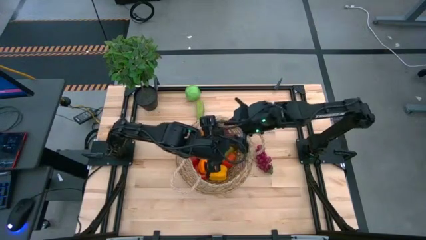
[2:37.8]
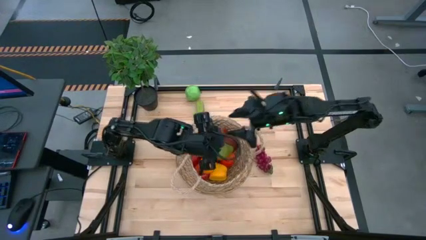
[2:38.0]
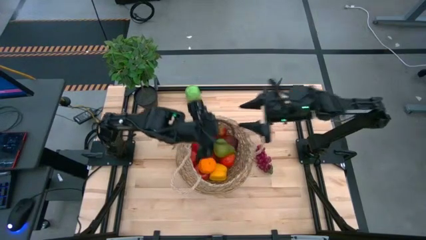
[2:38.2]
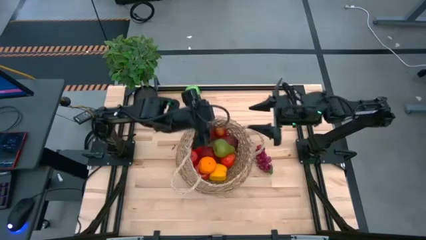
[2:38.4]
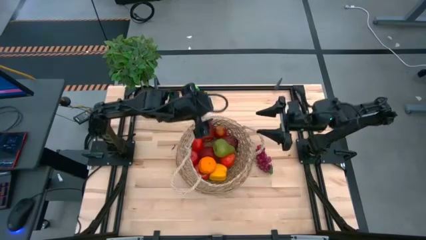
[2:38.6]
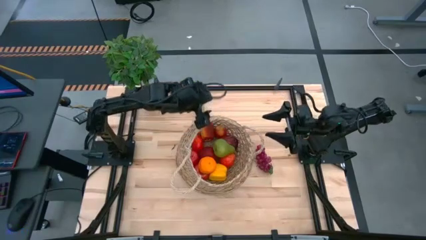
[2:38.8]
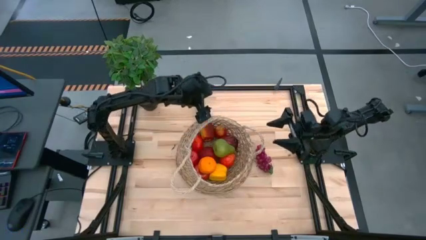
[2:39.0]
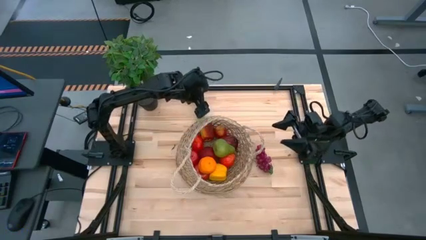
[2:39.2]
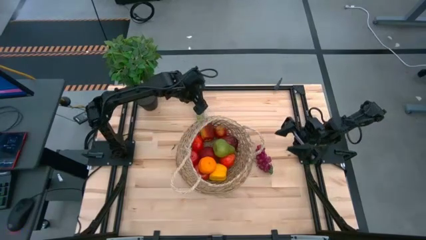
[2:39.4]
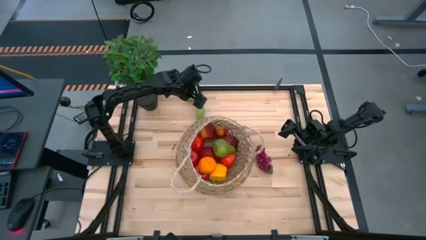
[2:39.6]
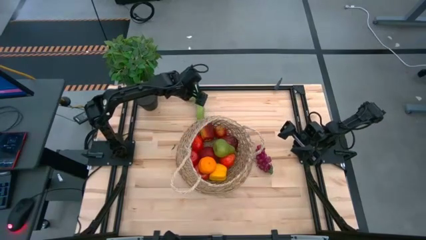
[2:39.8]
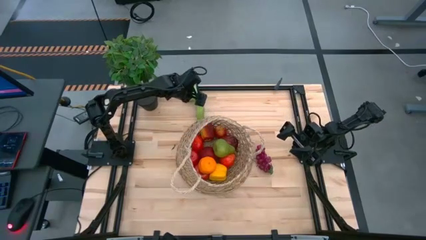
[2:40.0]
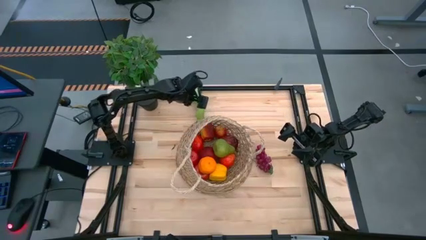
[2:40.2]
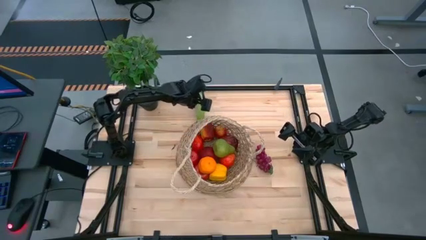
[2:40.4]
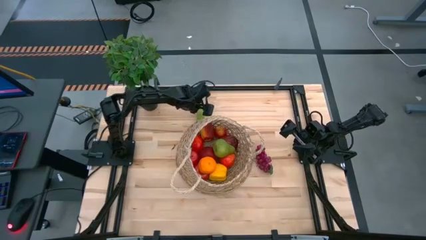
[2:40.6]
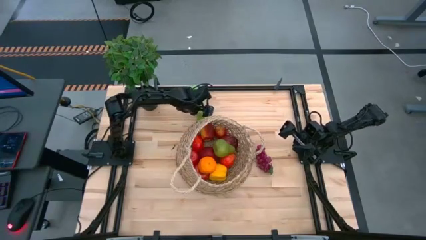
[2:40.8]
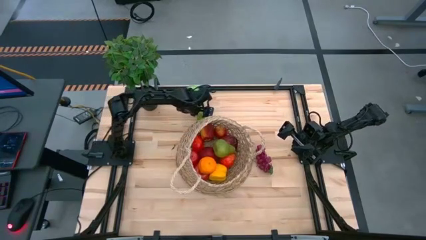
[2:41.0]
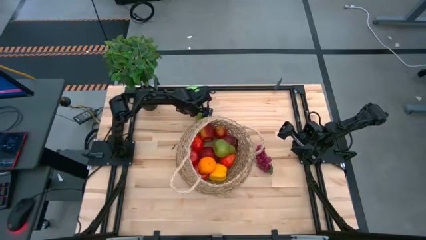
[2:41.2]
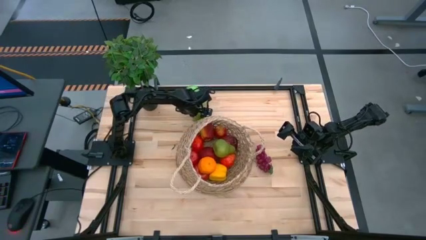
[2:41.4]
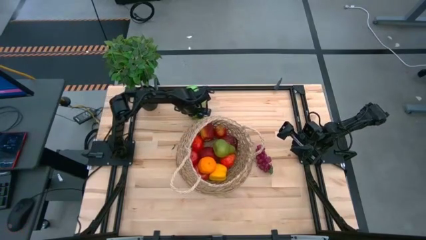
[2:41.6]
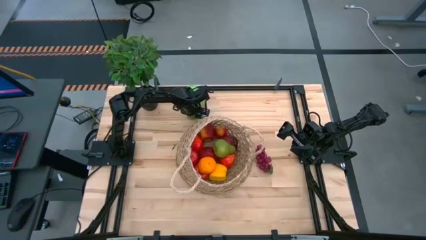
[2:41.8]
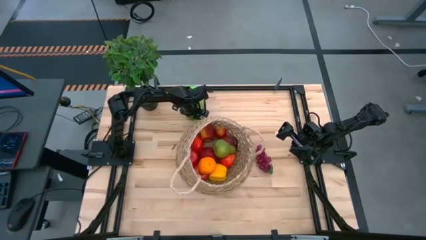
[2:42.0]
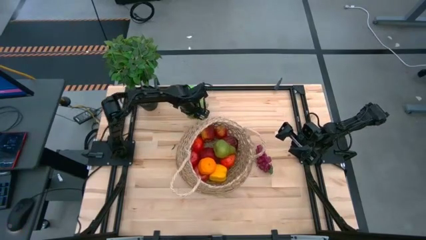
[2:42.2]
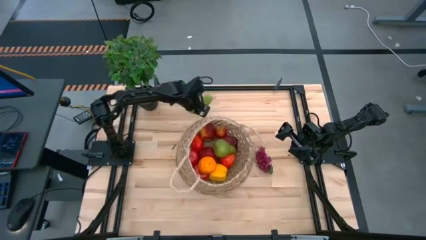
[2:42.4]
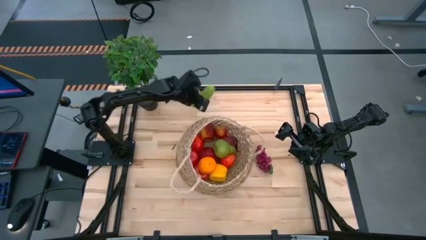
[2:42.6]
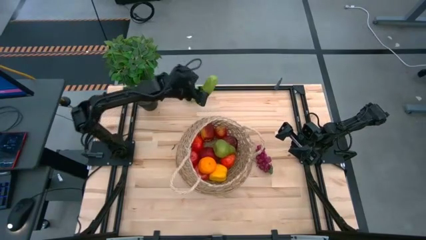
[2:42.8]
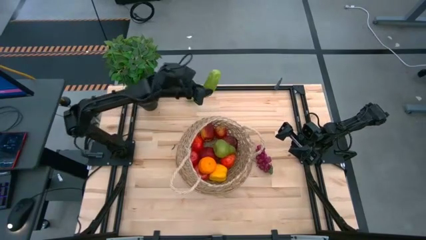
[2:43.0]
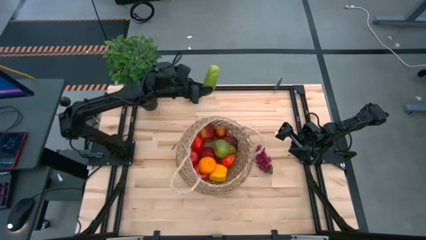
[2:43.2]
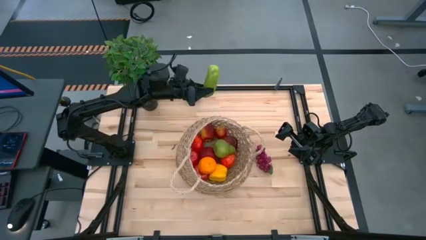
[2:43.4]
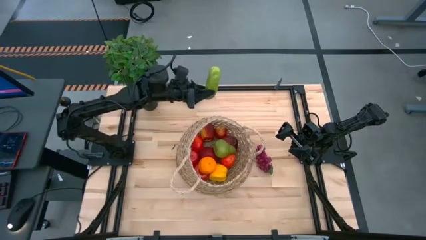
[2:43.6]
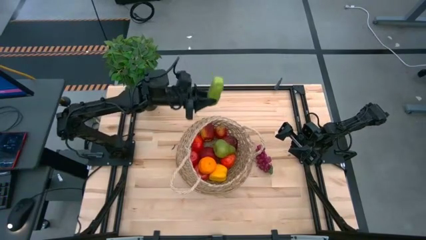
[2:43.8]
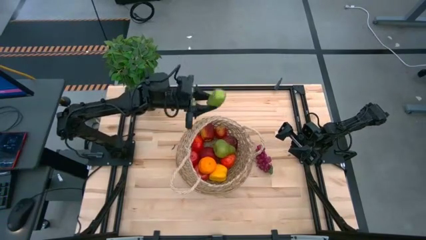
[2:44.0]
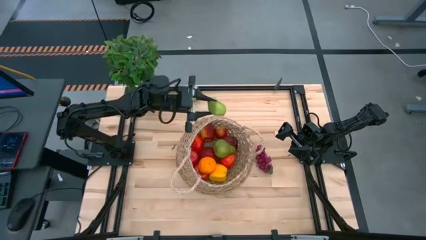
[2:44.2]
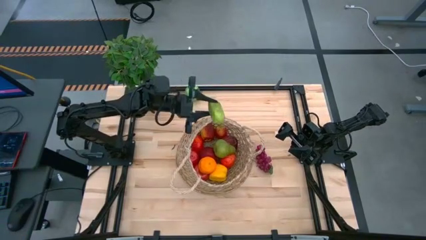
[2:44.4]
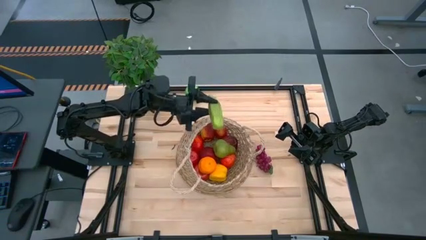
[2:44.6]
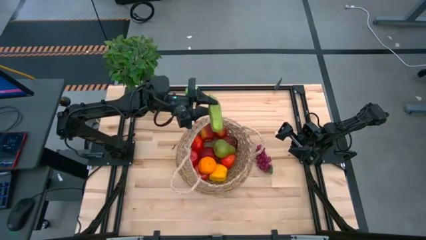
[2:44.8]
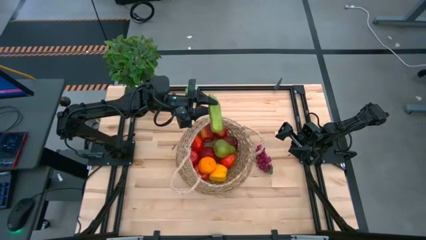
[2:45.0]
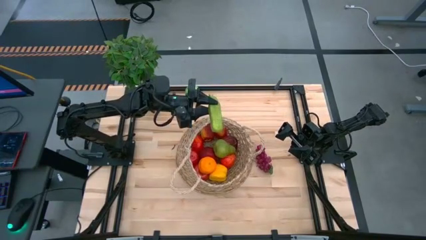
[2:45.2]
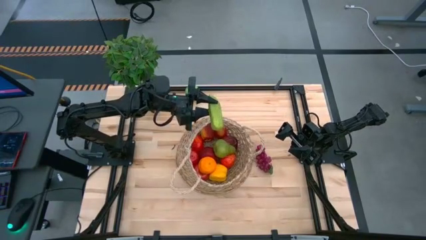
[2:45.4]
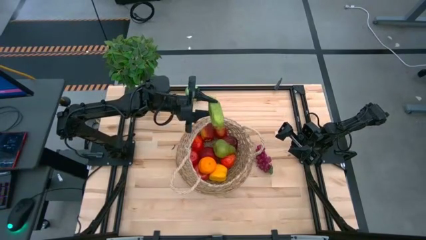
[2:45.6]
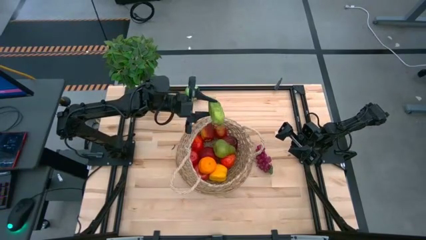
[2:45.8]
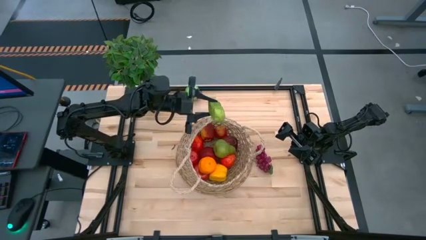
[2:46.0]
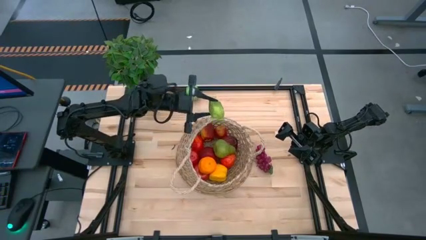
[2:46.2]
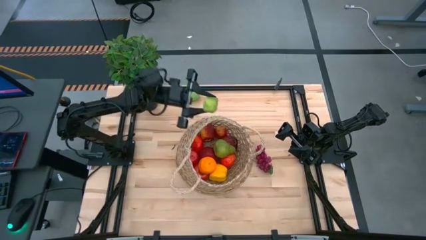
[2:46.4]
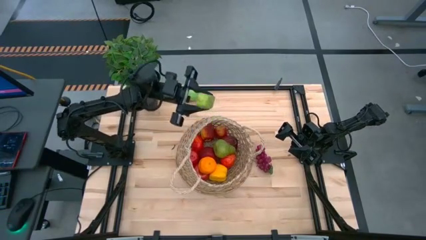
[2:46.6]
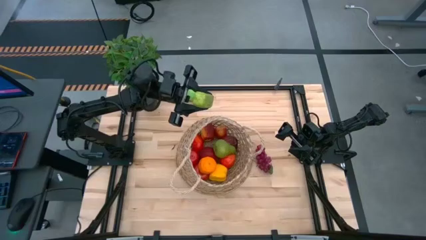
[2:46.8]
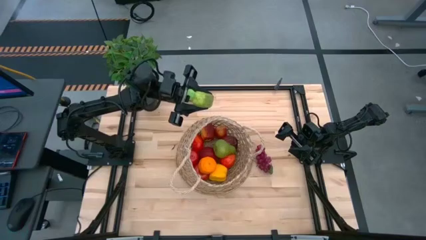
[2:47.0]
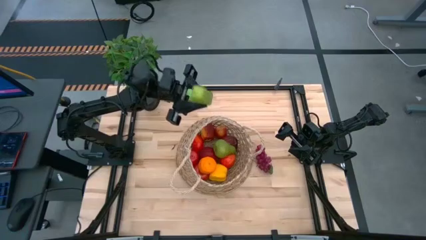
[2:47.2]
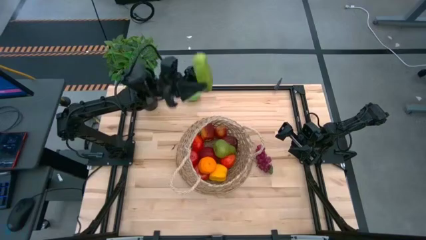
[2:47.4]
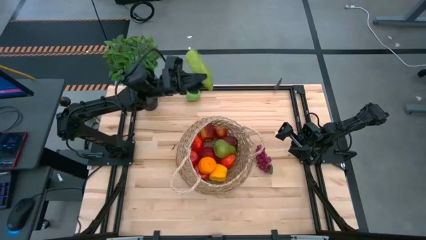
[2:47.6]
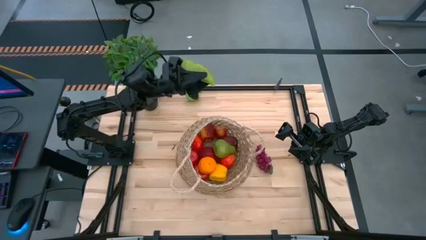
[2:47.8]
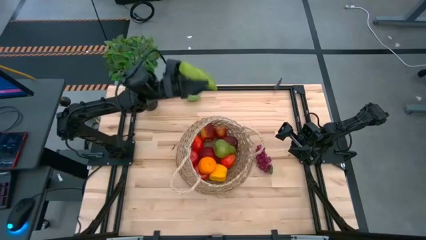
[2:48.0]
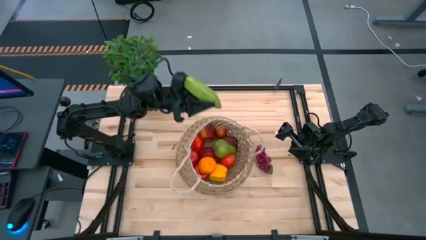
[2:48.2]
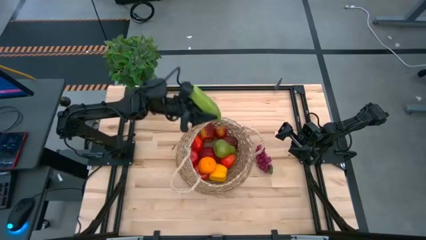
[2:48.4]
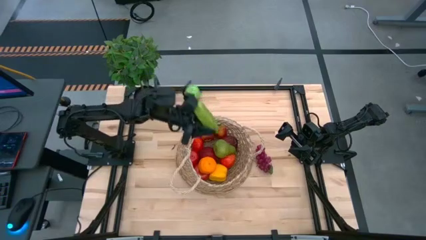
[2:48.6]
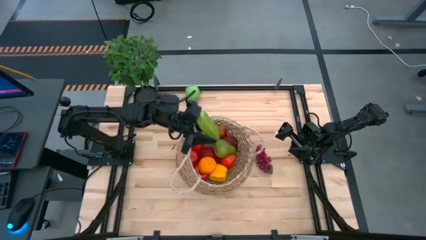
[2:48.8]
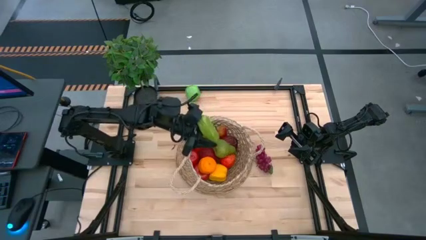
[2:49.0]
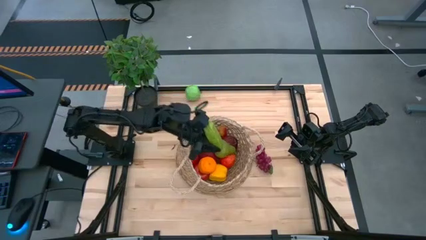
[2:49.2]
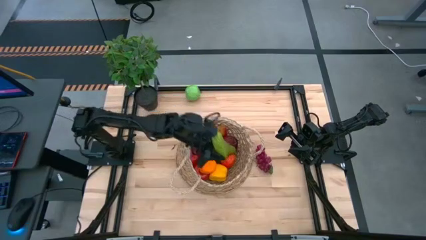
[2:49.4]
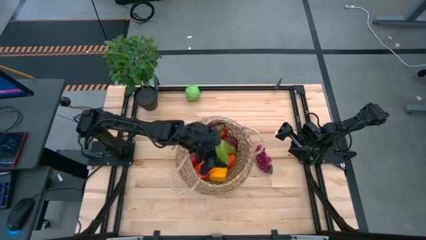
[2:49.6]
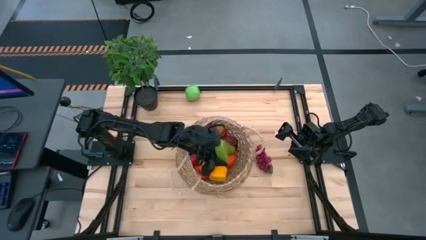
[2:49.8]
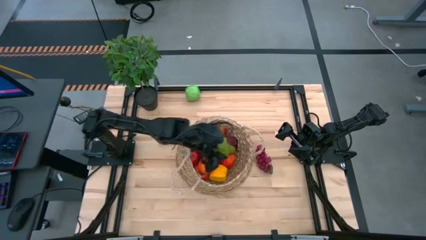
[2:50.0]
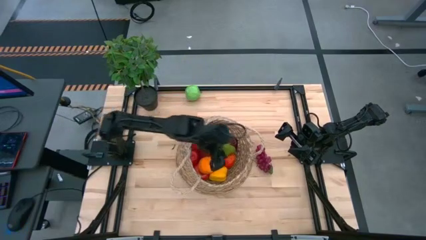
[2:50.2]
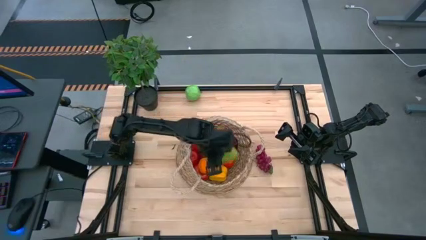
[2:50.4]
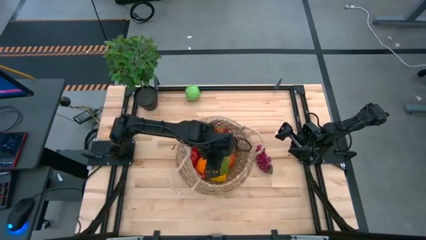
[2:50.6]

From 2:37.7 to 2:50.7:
Task: Build produce basket
Put the cucumber into the woven basket

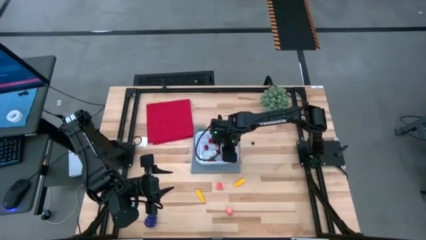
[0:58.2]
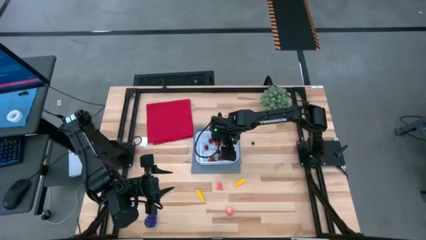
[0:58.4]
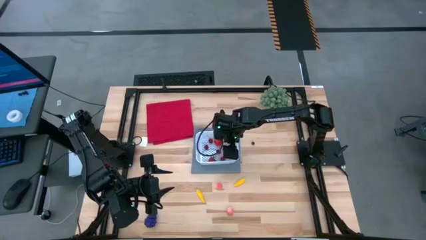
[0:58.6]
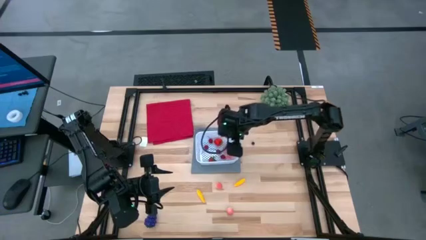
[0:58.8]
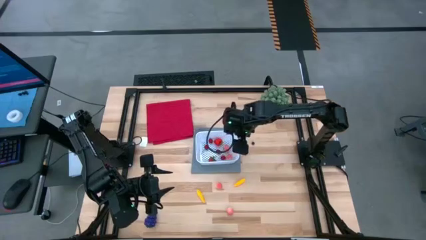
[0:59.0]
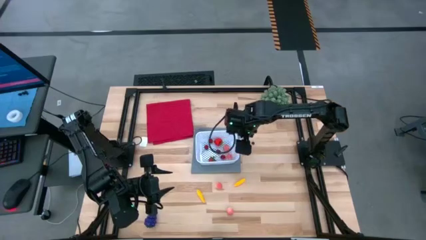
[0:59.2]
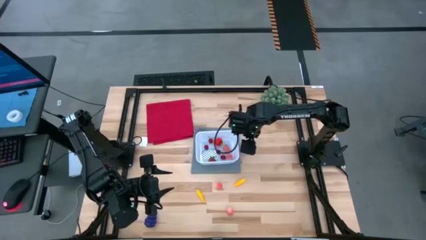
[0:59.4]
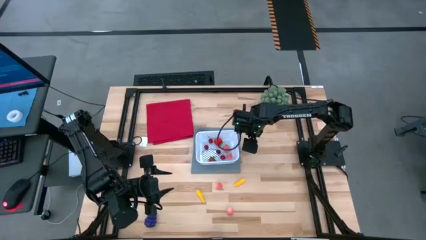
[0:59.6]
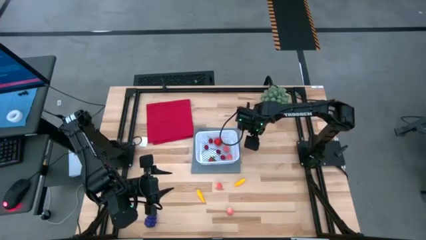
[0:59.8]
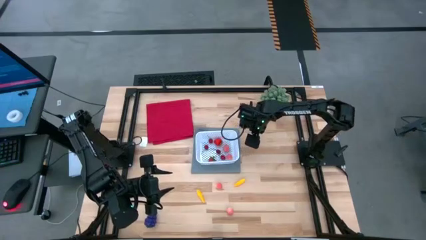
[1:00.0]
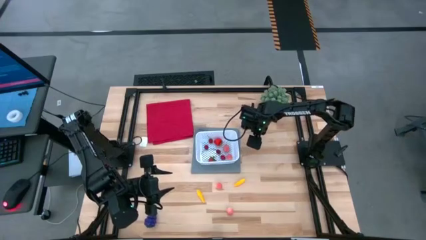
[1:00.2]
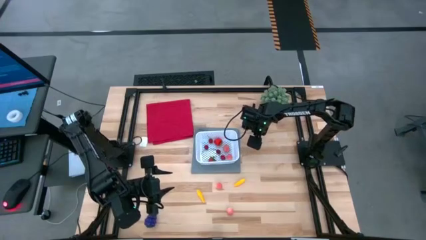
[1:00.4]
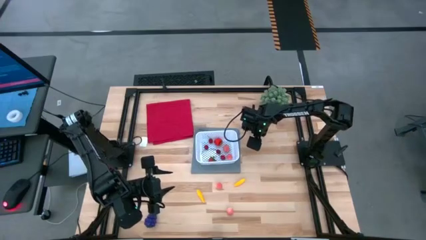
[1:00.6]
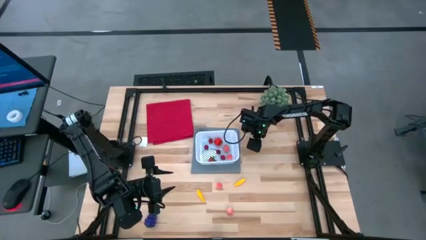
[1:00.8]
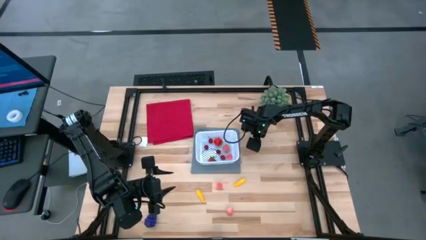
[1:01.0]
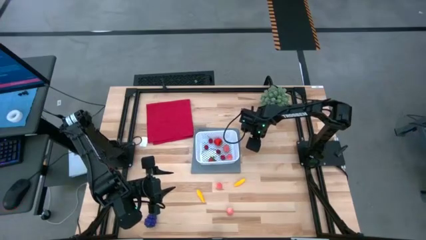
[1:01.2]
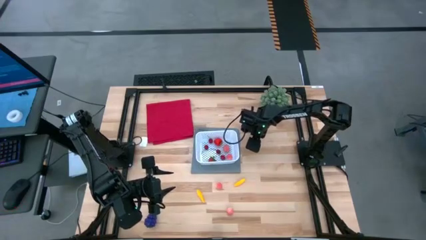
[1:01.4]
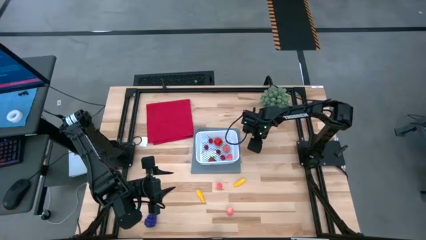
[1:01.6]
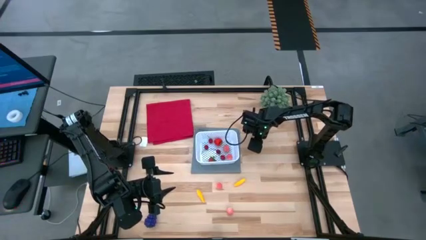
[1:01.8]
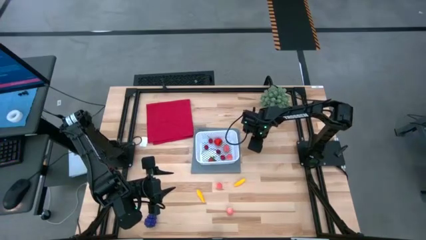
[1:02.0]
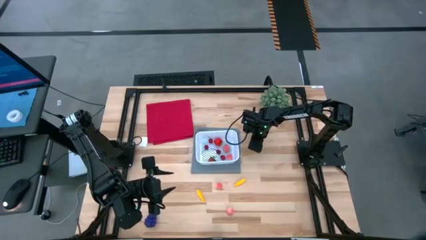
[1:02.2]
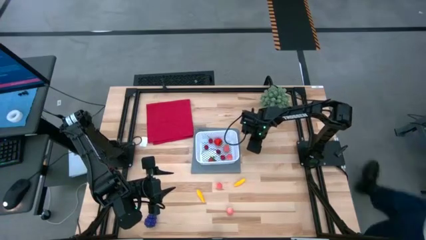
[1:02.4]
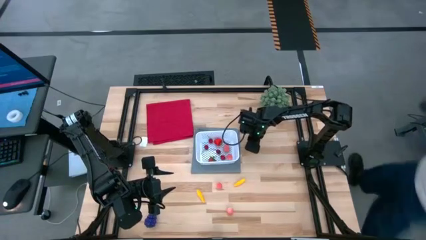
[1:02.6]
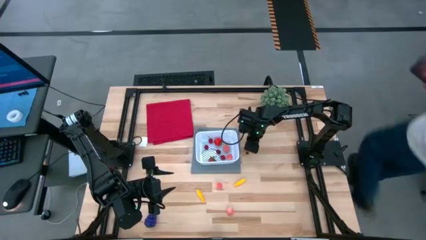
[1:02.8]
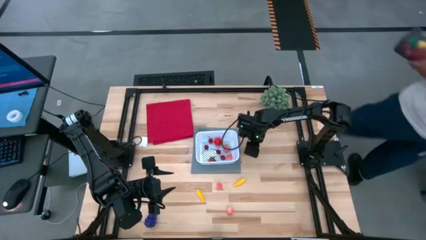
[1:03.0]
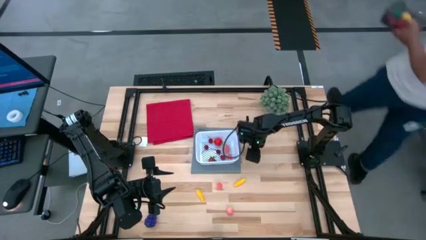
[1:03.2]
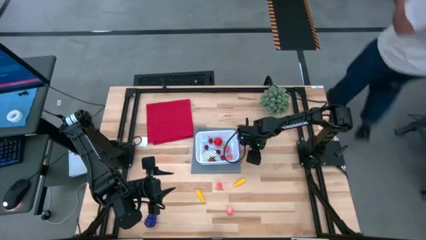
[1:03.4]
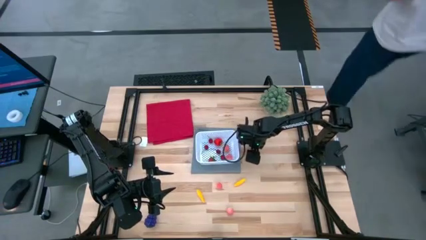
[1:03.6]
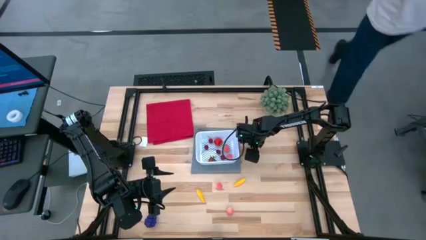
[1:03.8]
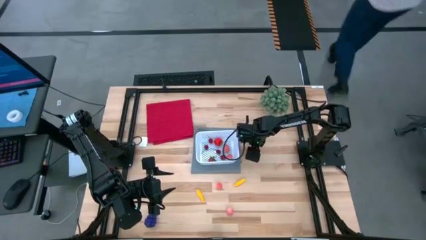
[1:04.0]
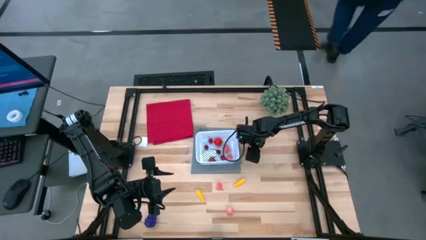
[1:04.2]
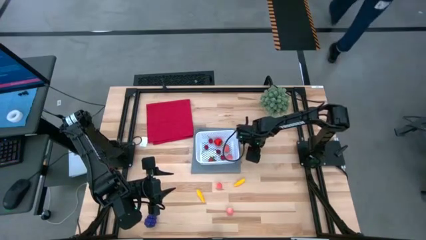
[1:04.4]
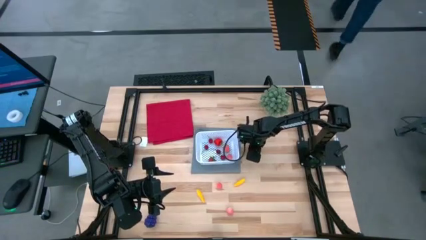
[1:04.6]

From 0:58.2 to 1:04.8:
Task: Pick and placing Produce into tupperware
Put the blueberry into the white basket
